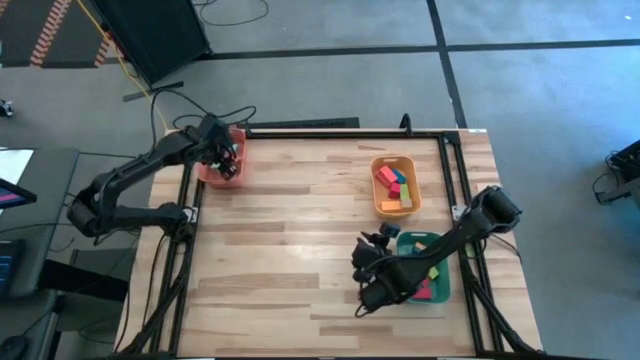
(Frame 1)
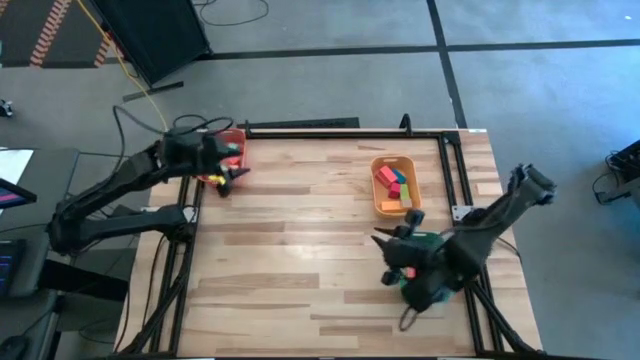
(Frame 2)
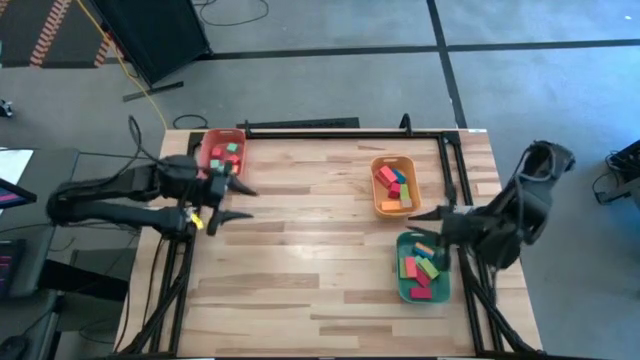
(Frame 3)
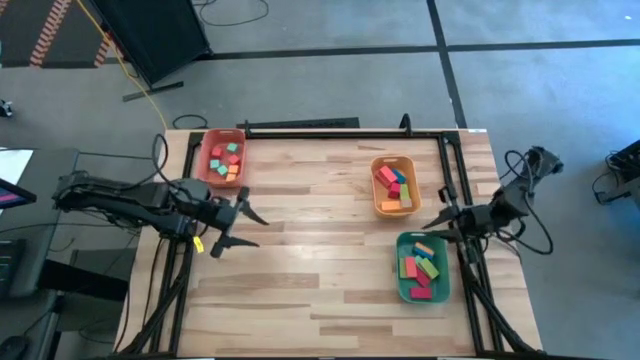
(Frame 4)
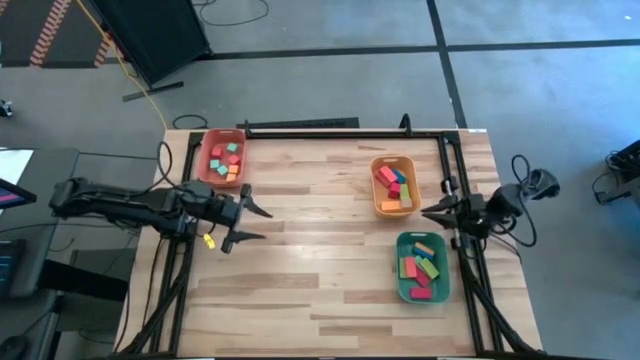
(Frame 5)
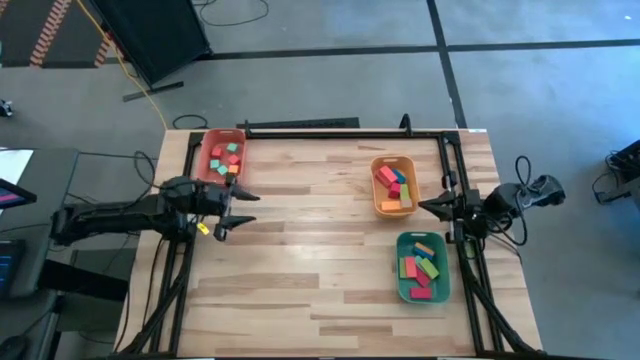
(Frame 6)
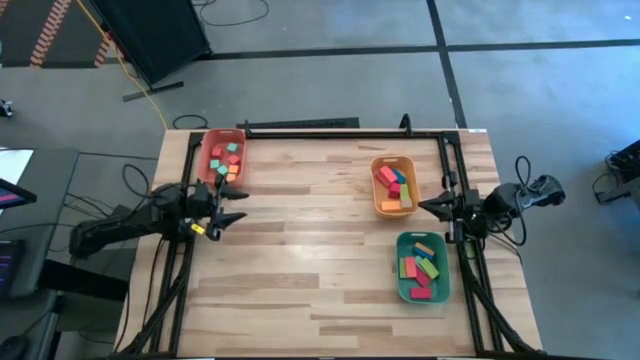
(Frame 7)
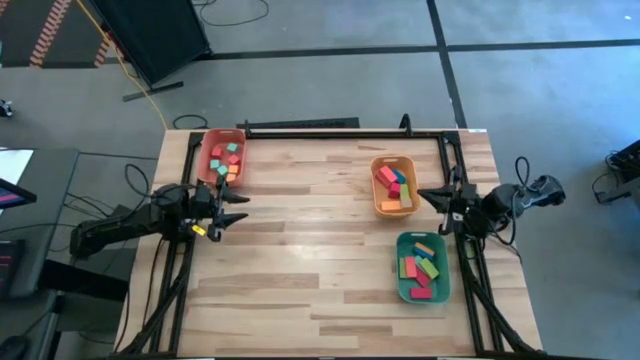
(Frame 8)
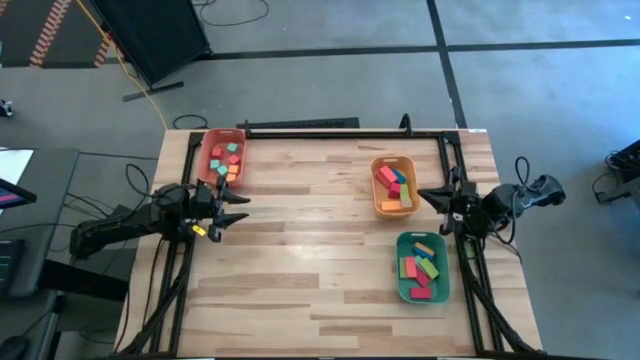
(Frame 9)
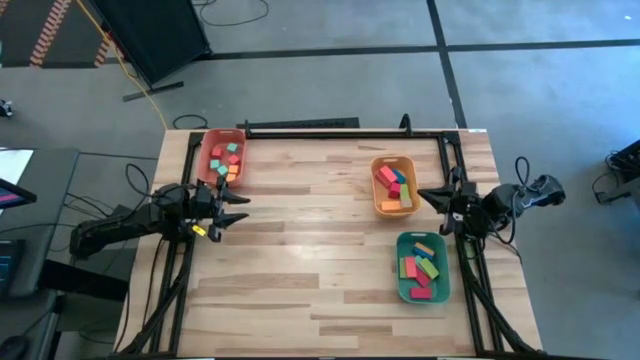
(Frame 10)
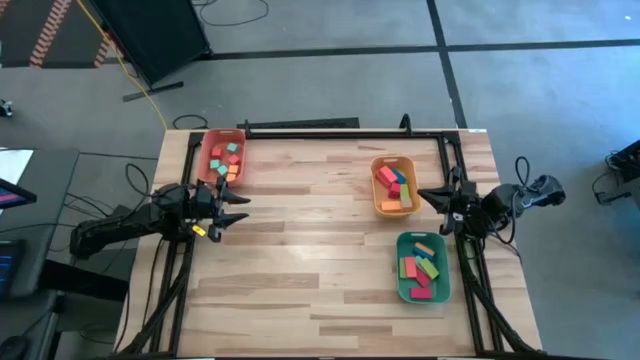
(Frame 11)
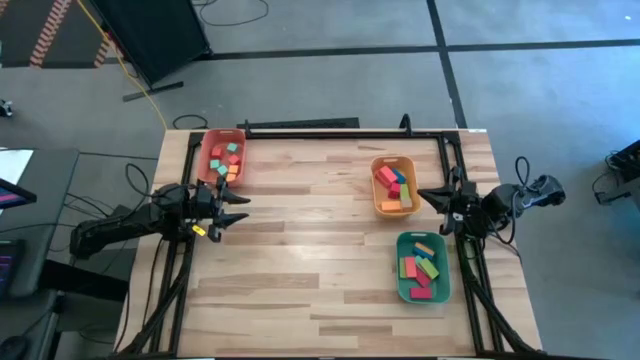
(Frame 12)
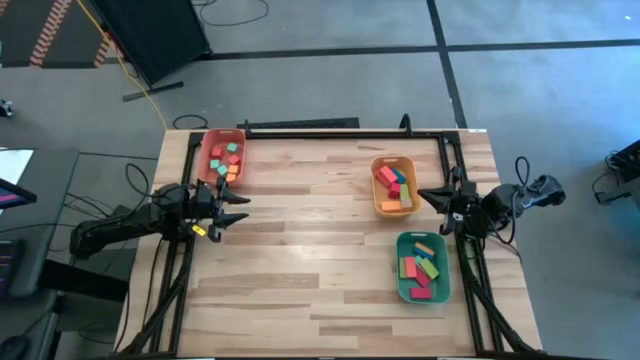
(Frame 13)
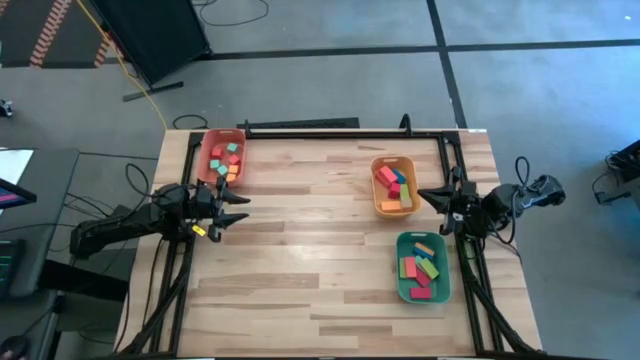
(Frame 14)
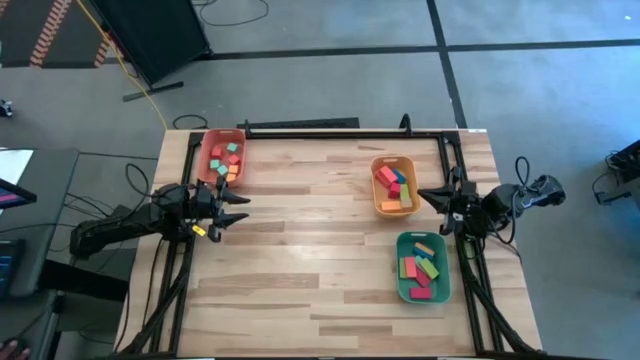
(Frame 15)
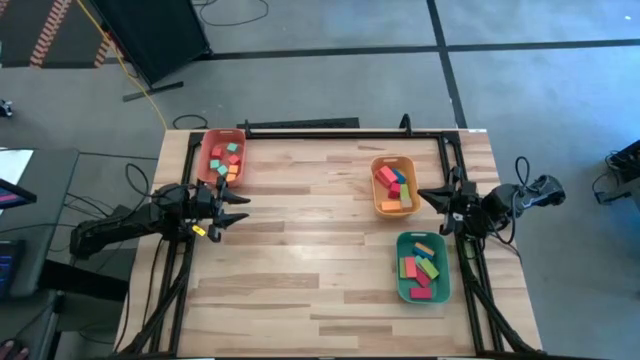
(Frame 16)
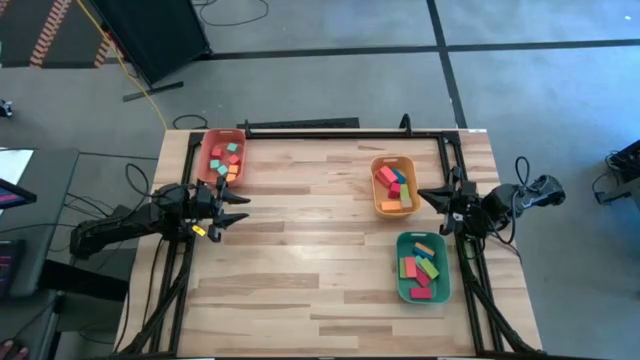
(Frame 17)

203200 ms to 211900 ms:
Task: Sort blocks by size
Return to Home Position

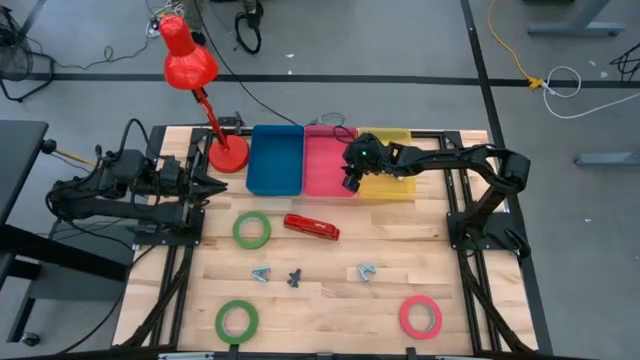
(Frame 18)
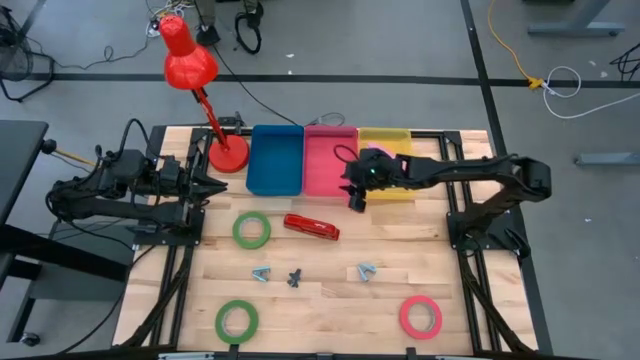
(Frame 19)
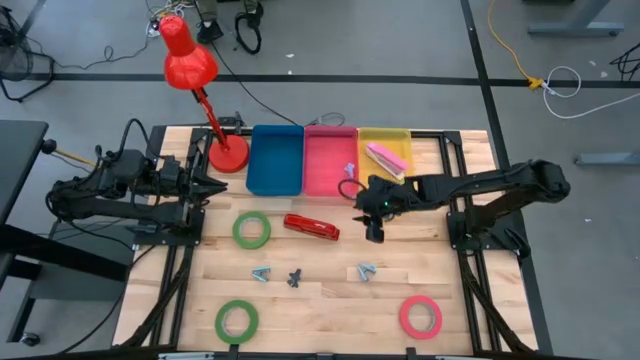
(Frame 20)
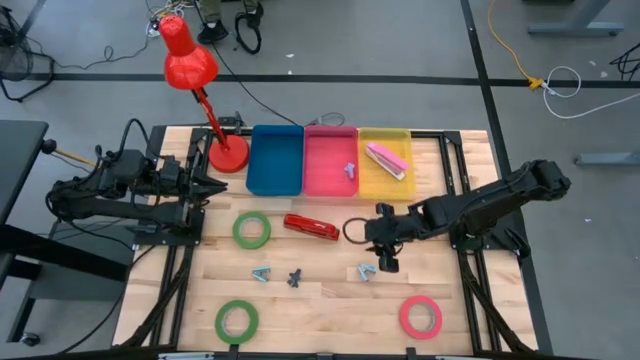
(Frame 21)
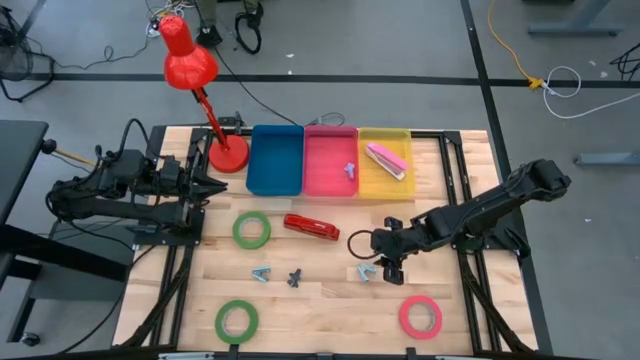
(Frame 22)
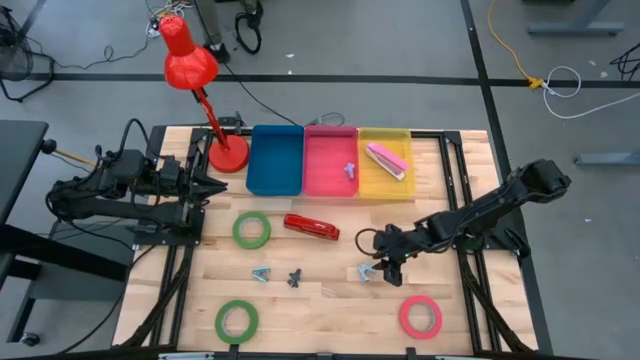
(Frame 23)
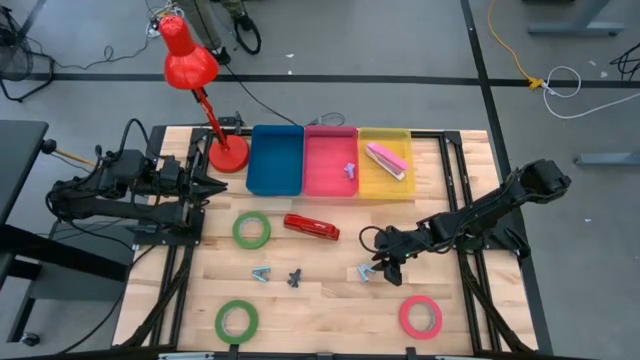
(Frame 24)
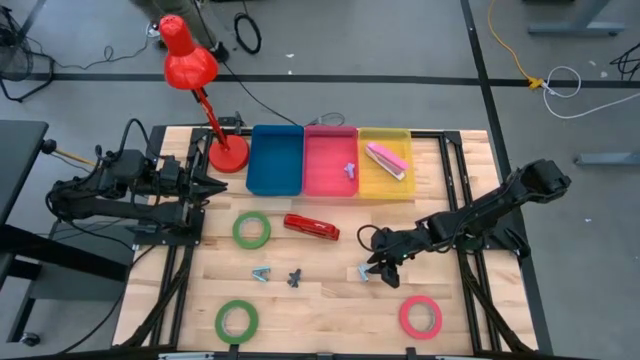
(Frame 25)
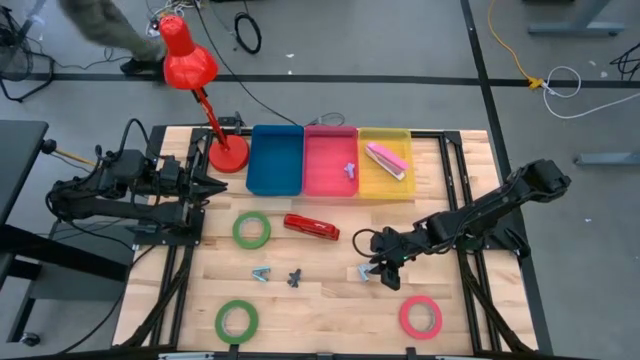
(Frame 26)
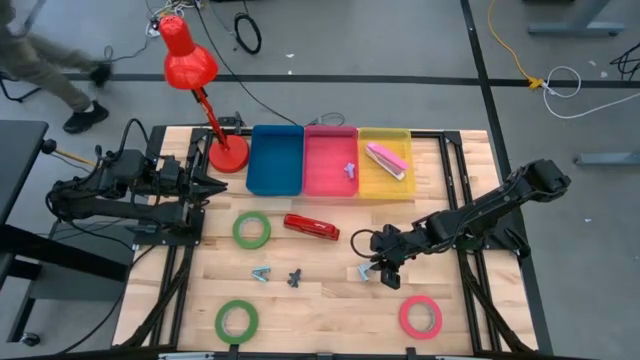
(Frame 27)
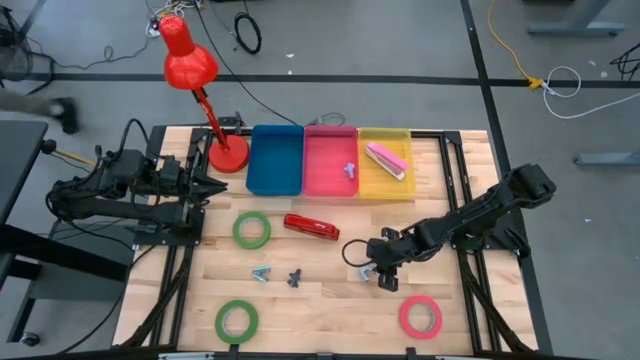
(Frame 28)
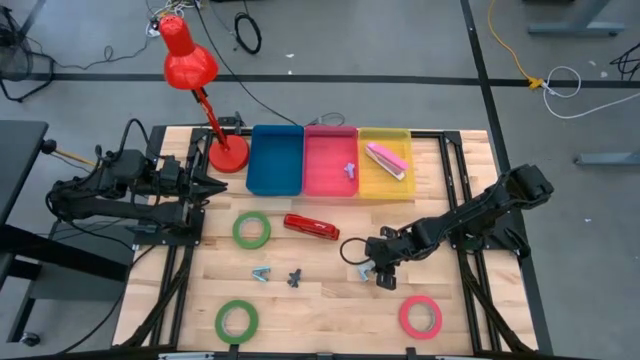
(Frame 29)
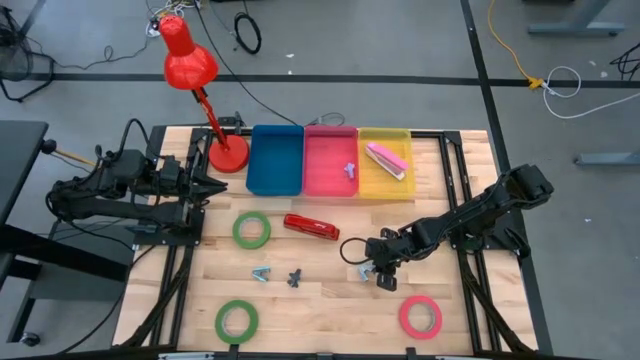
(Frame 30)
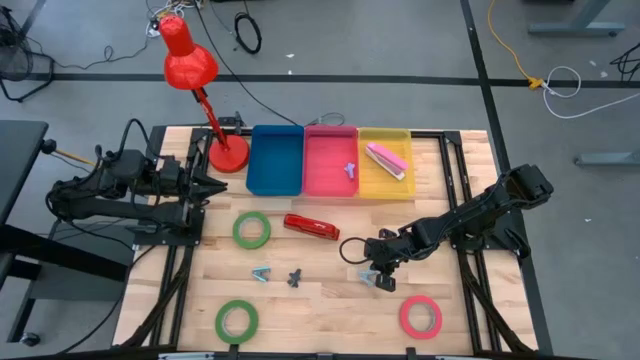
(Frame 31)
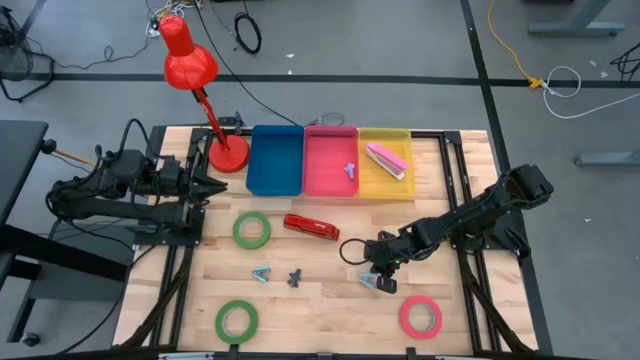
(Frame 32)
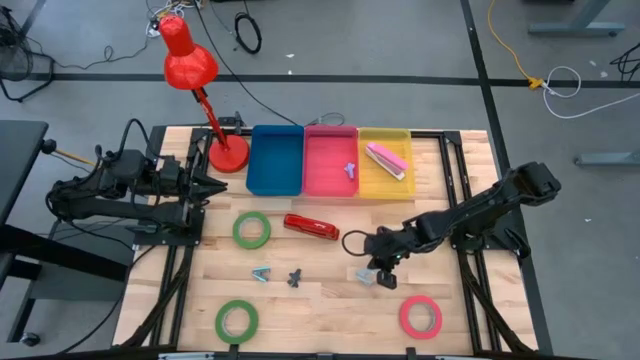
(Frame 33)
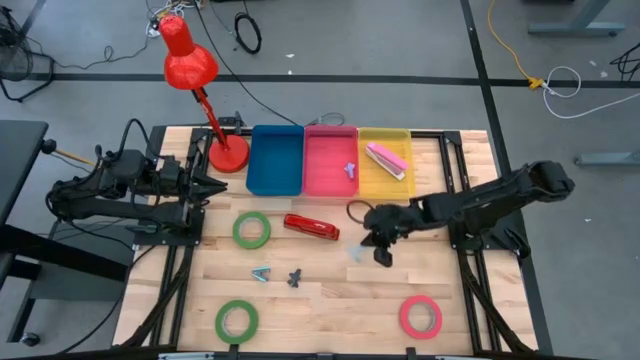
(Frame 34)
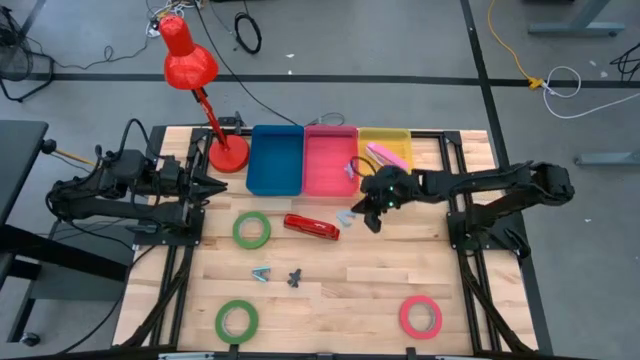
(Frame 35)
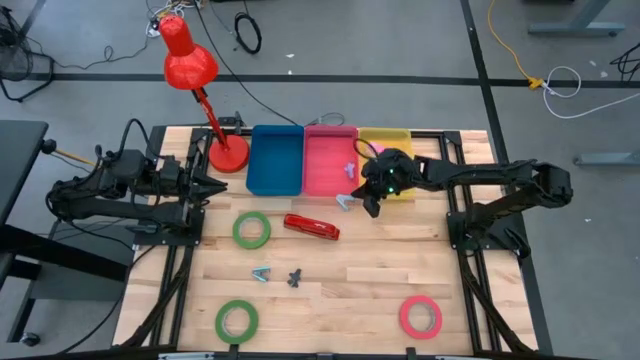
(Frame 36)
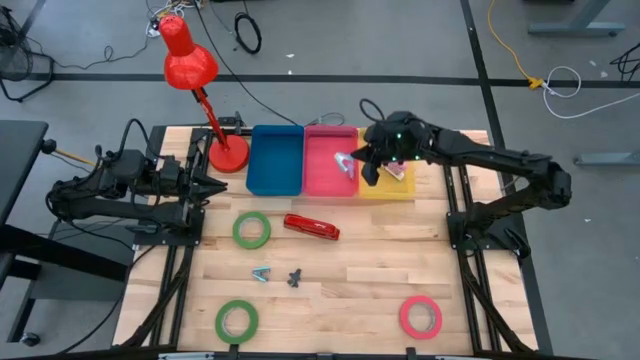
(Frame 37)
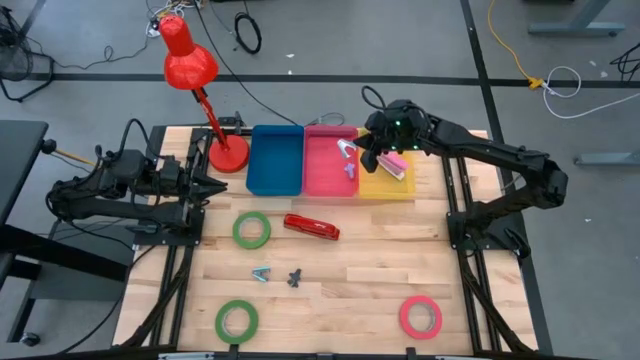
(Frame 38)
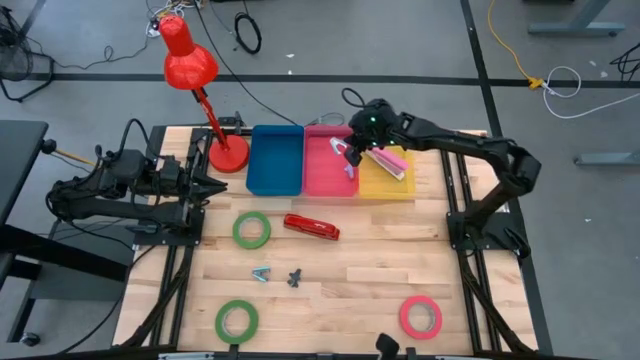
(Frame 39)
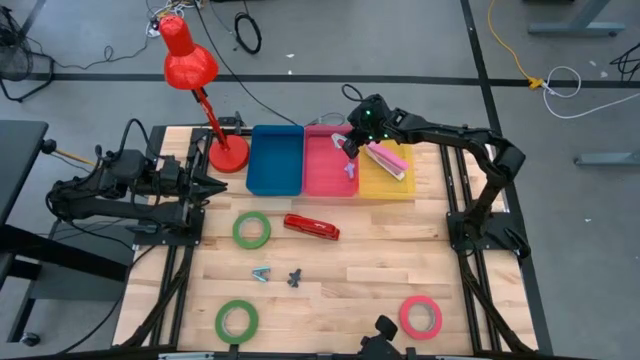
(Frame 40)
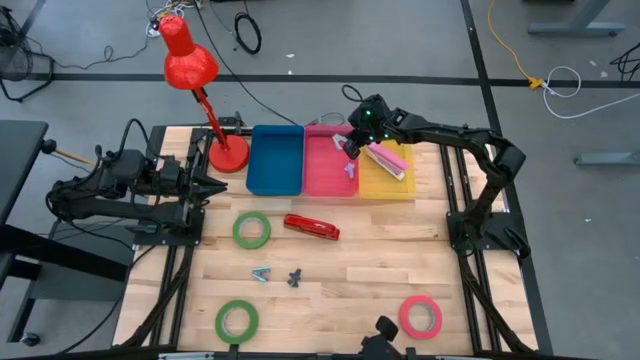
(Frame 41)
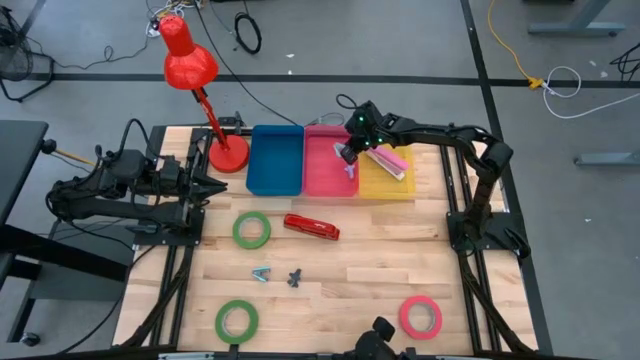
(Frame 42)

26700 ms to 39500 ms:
Task: Pick and place Stapler, Stapler remover, tape
Put the light blue staple remover into the red bin
